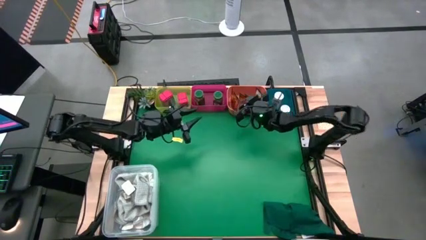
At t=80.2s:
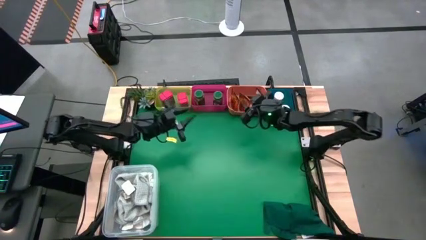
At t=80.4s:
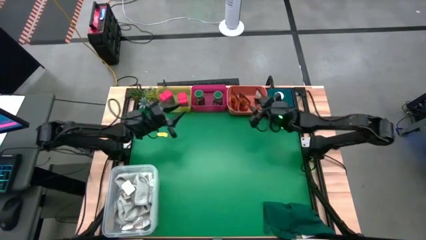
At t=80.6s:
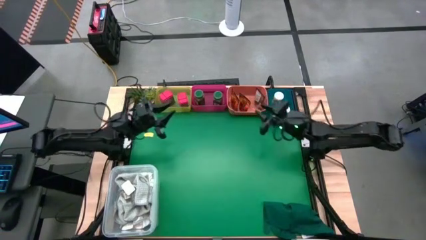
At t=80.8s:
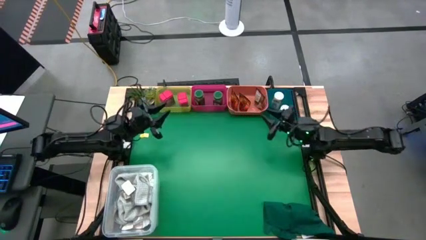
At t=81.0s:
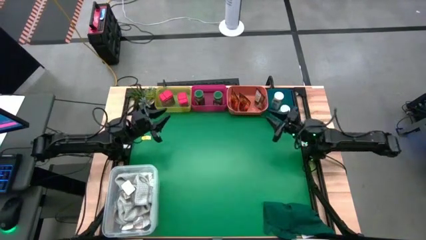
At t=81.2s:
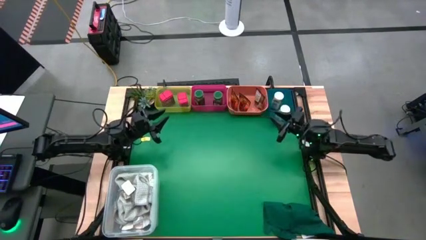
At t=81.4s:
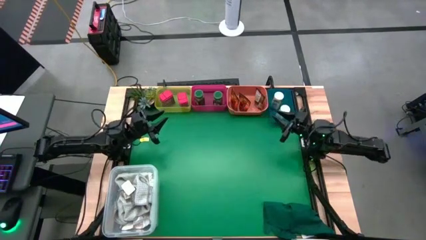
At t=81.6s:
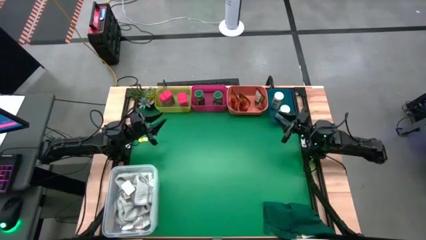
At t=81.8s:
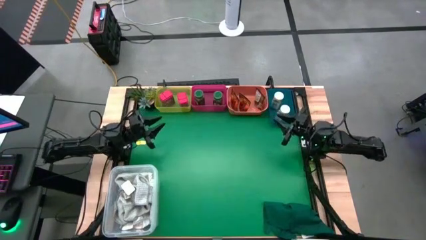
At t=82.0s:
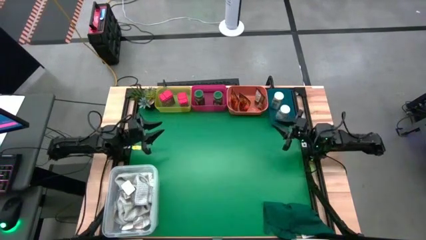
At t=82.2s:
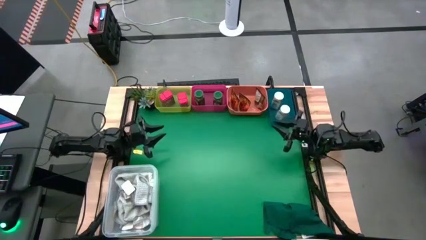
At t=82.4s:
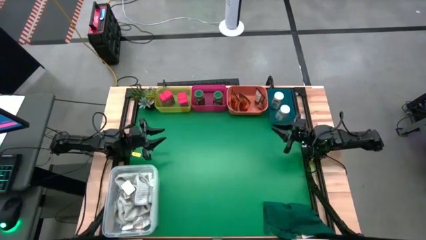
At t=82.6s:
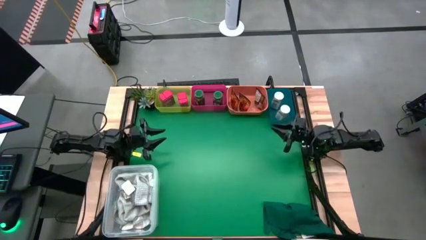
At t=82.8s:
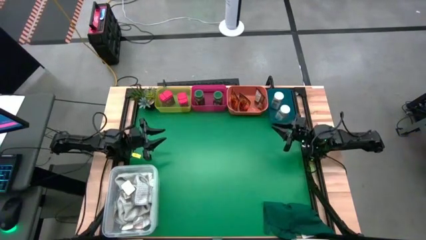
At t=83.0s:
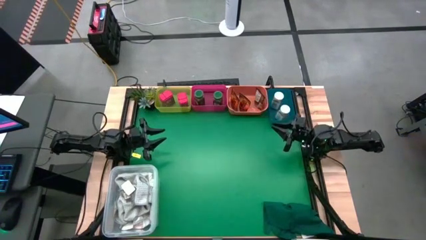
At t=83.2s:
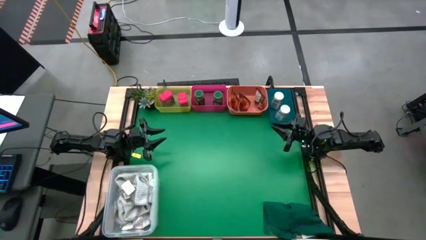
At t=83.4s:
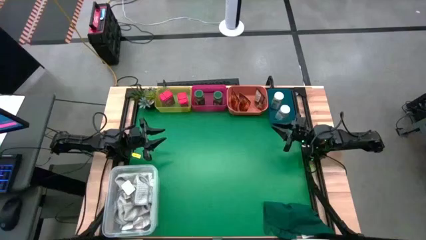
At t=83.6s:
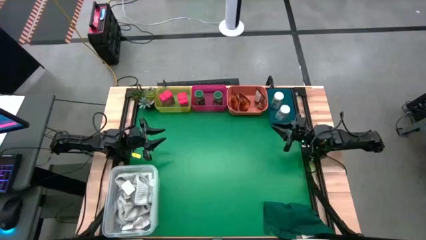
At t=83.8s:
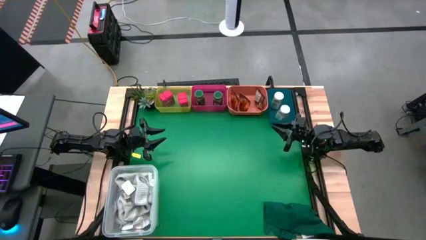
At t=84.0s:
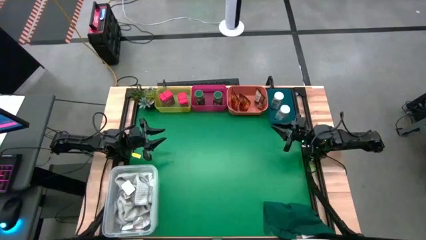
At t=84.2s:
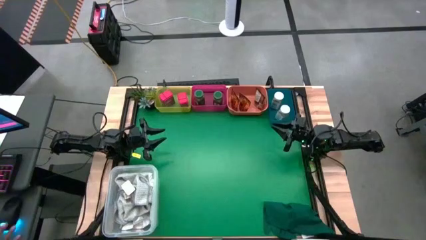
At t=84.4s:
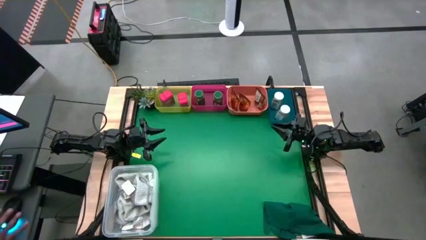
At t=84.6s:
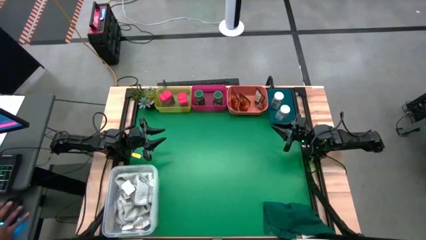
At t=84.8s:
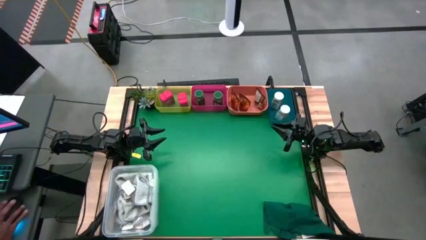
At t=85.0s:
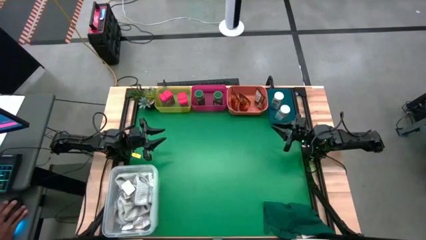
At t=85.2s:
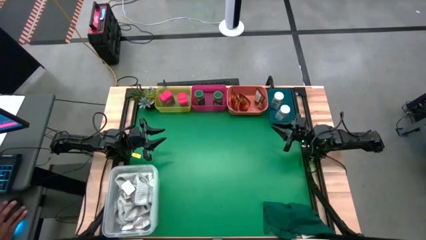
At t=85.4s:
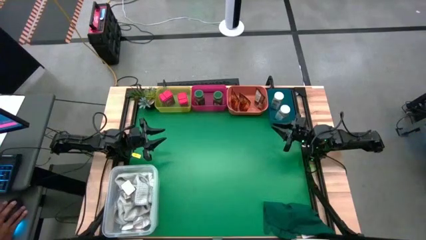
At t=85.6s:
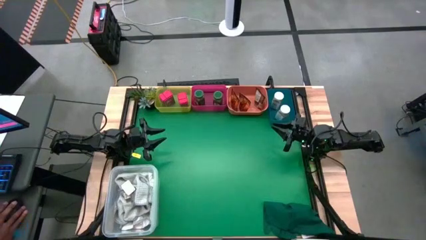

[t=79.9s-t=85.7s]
Task: Sort spices by type
Return to Home Position

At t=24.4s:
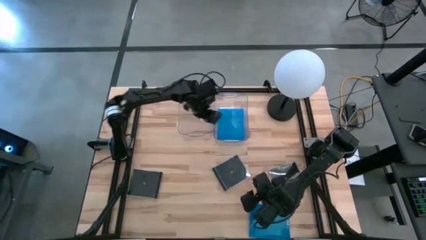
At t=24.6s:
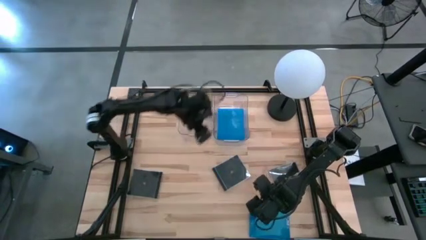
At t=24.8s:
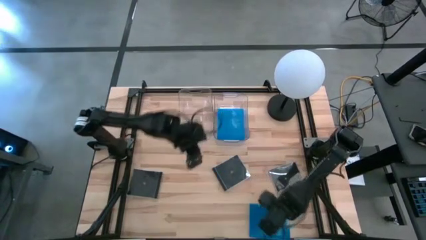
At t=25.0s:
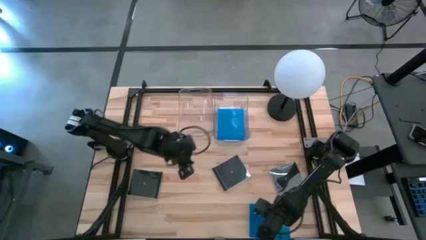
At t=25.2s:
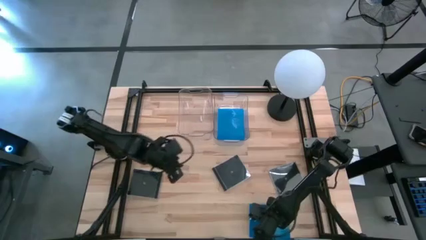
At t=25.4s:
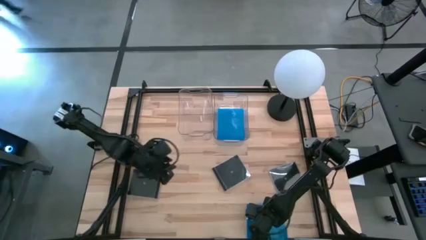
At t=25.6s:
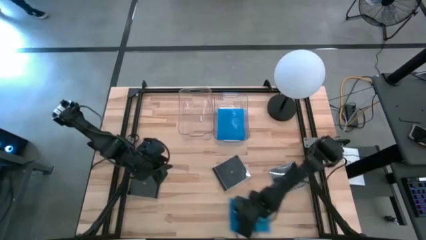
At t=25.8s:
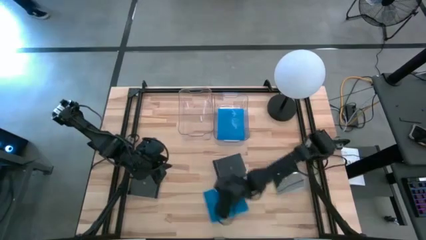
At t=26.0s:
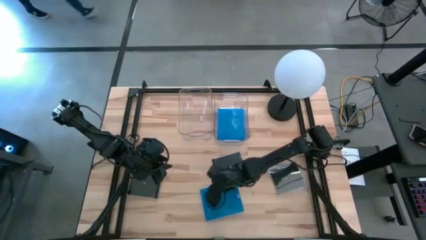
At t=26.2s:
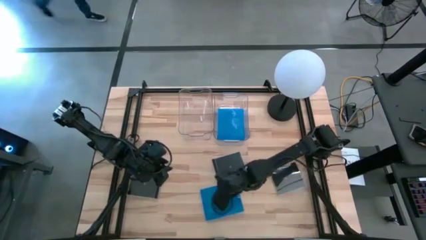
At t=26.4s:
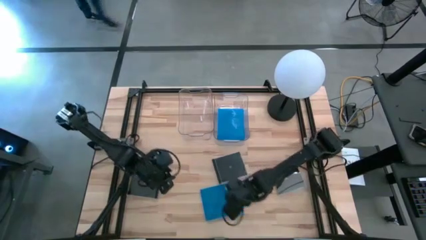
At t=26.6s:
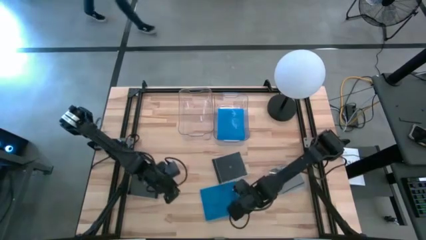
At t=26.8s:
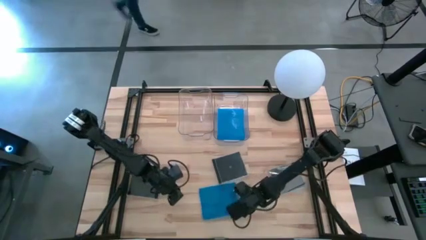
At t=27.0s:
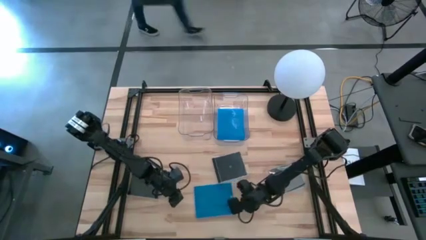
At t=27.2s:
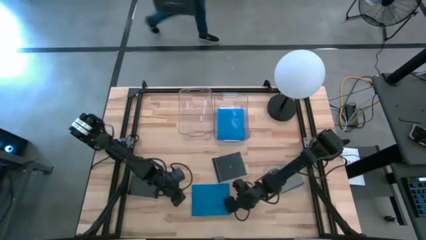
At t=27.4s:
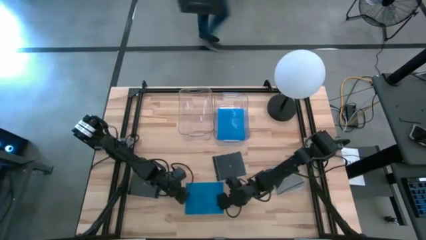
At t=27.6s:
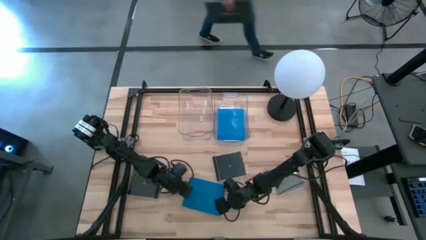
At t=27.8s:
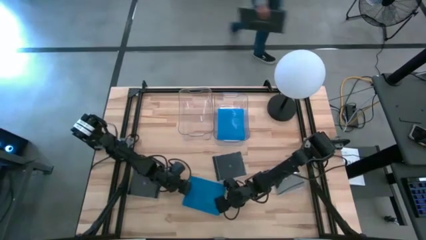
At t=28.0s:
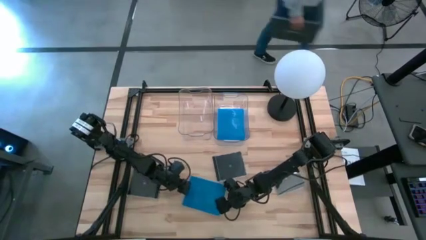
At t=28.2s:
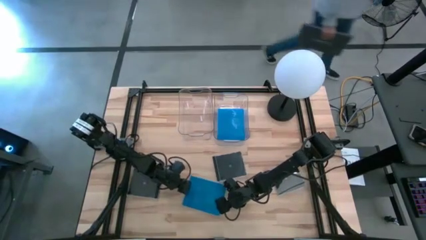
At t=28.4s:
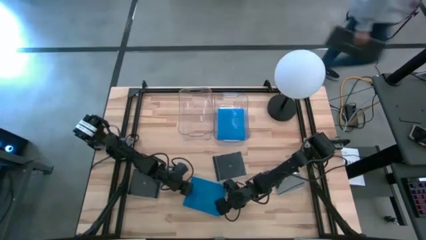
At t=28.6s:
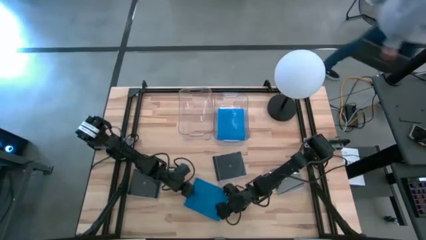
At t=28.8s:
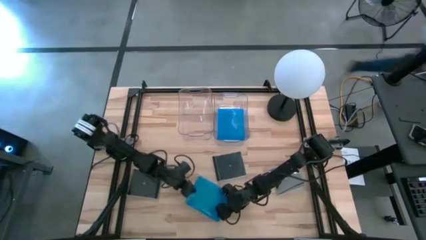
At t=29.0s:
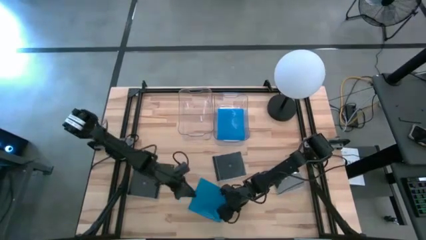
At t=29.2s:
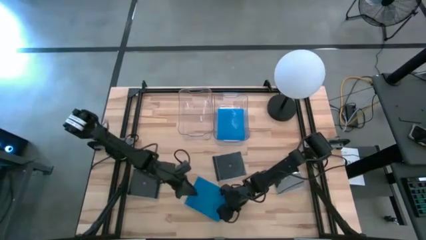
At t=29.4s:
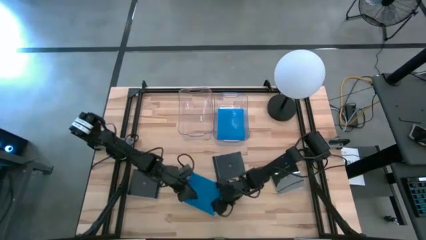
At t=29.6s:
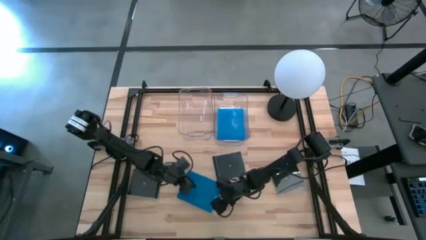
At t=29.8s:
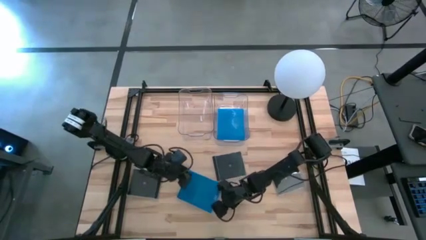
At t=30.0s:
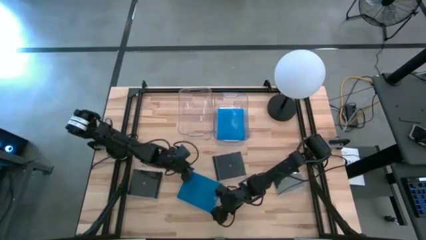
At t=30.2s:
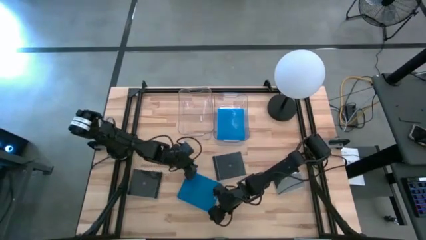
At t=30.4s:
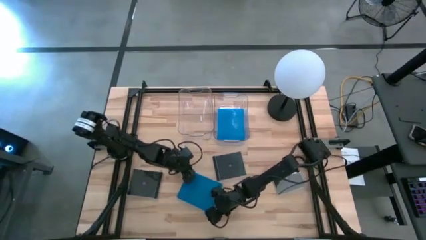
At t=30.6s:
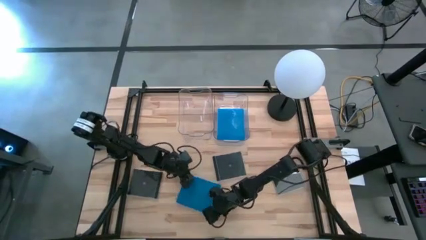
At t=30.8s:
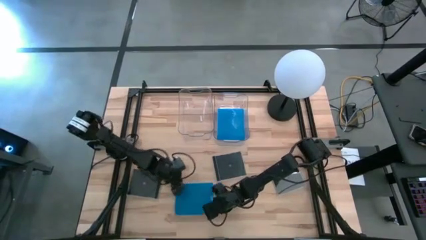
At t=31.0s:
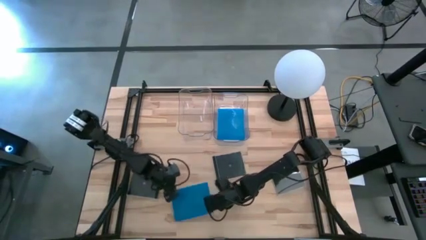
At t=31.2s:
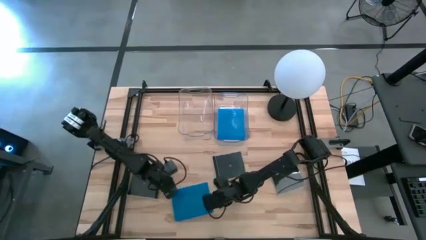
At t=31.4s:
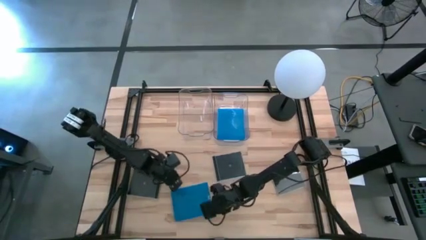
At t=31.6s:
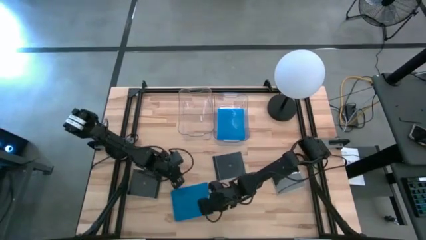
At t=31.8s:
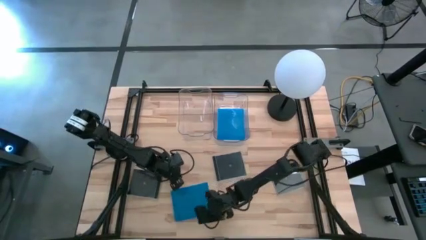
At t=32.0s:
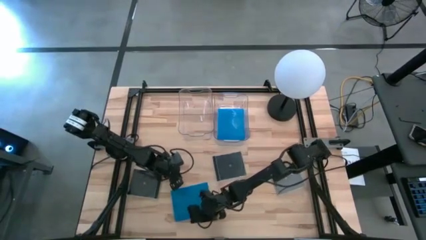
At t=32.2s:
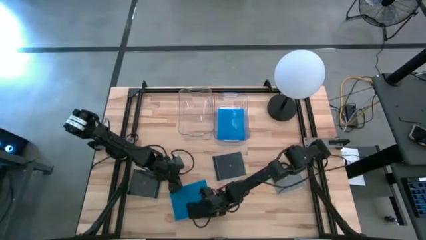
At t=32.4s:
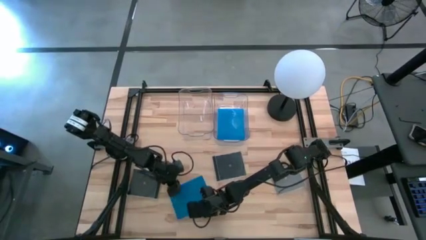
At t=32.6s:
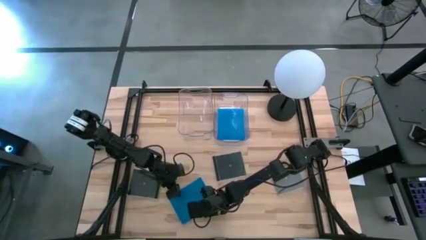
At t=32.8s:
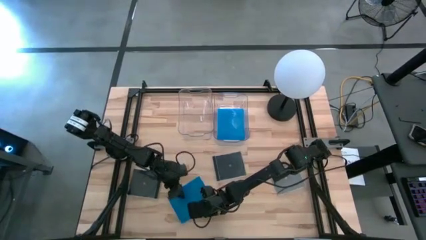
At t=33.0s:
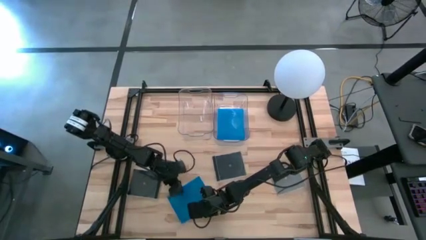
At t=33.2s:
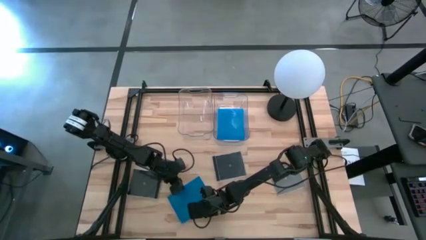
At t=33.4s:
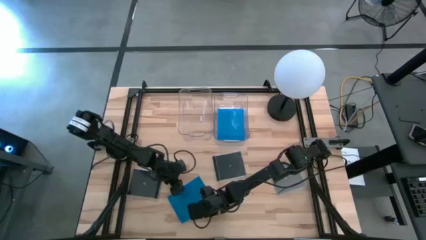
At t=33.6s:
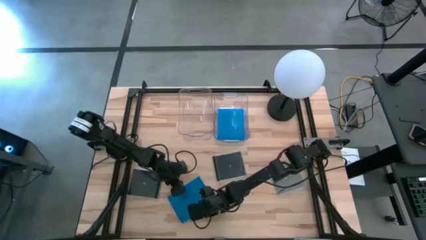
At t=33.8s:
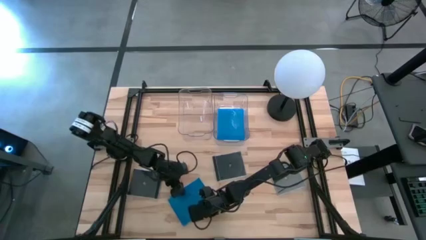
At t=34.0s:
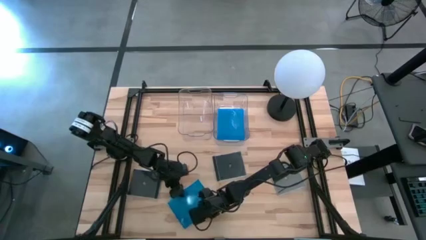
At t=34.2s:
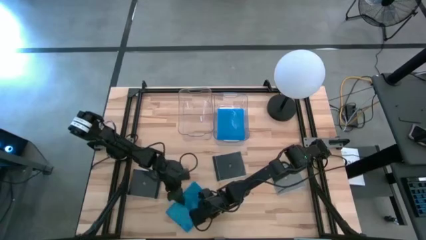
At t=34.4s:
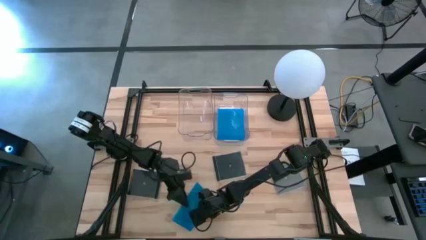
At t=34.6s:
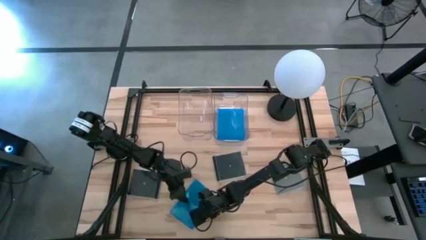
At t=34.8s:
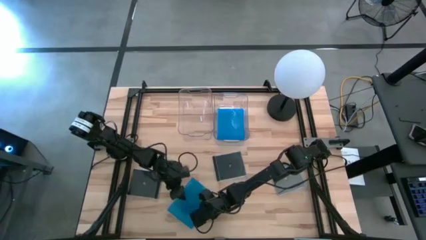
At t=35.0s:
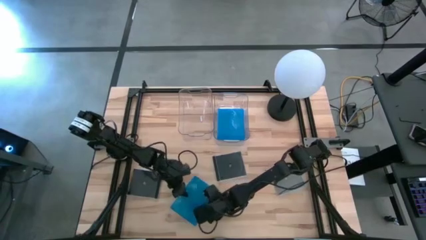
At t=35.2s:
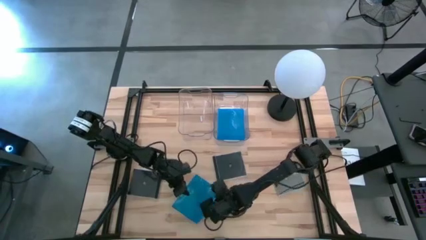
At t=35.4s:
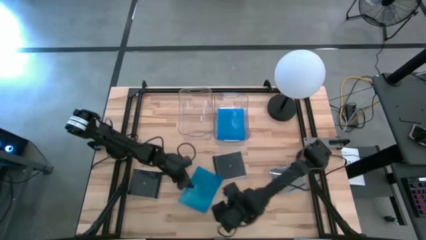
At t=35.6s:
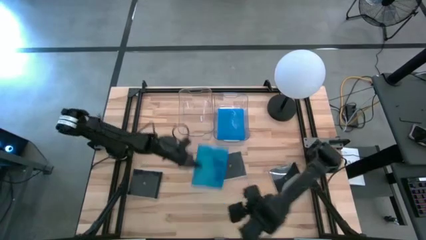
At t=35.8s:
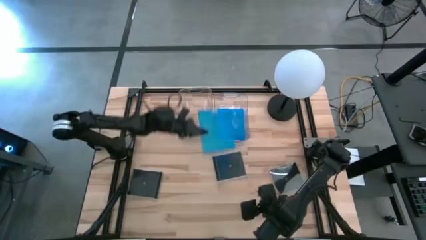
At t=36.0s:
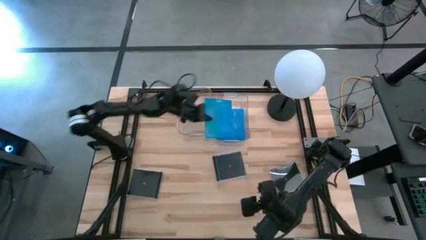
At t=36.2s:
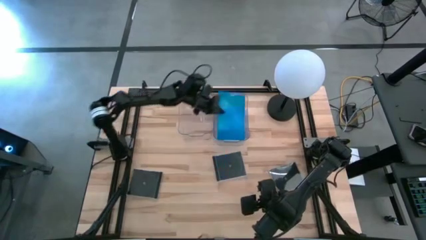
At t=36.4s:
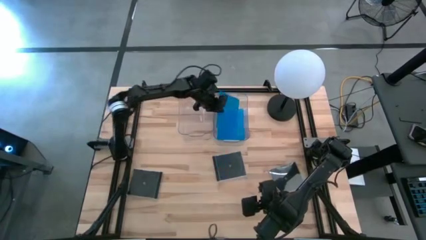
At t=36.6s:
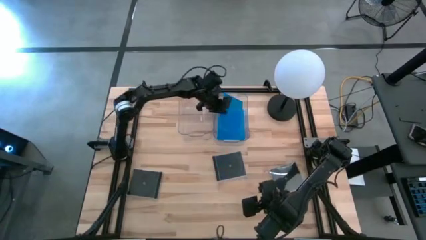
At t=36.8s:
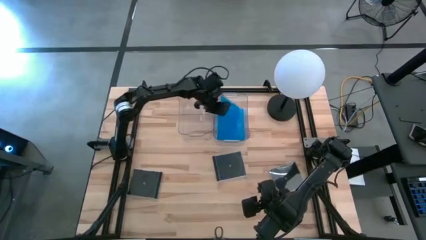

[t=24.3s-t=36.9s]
Task: Pick & place jewel cases by type
Put the blue CD case into the right transparent bin
